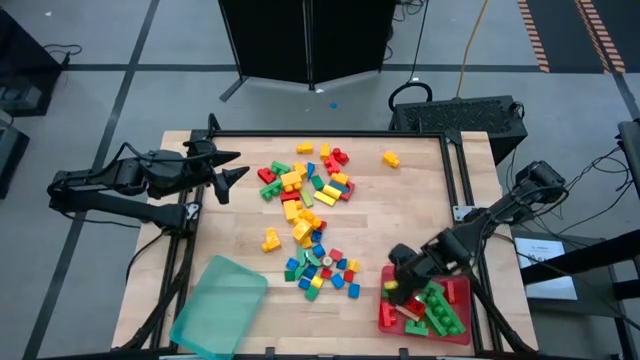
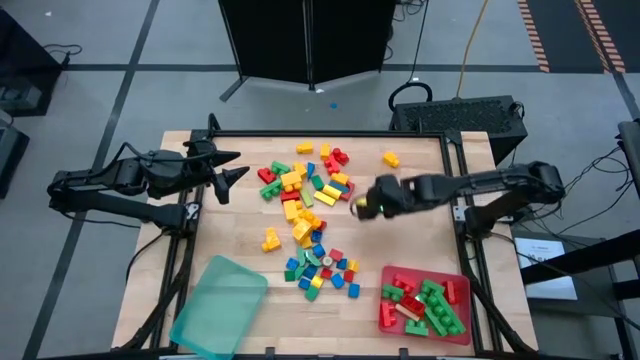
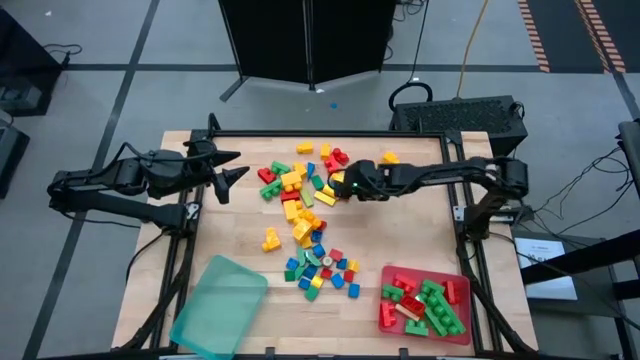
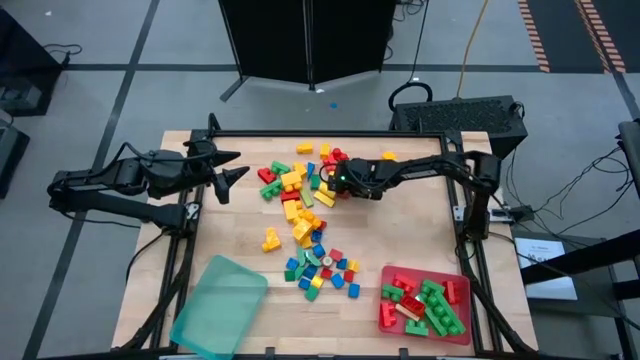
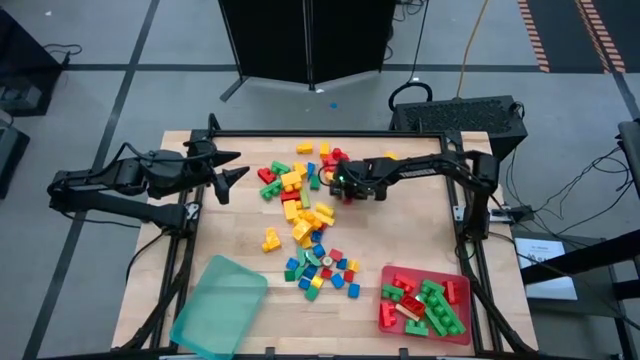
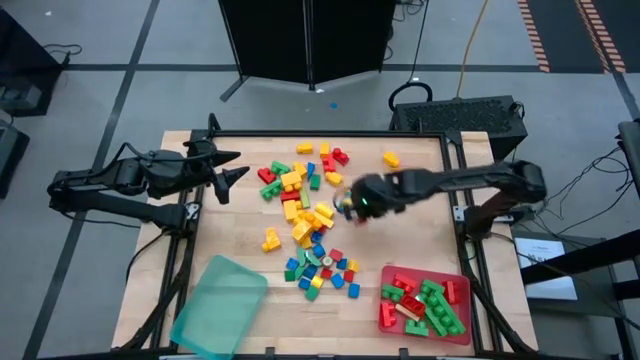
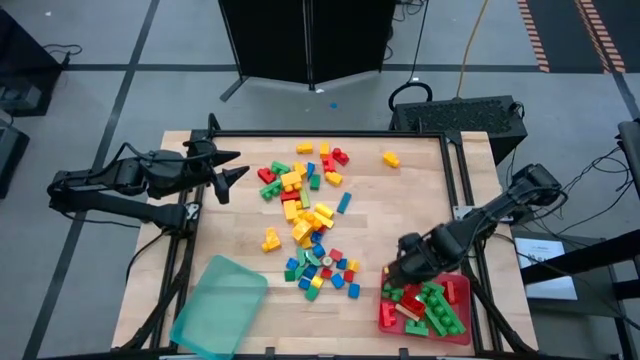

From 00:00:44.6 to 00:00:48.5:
Task: Sort blocks by size
Put the red arc block into the pink bin

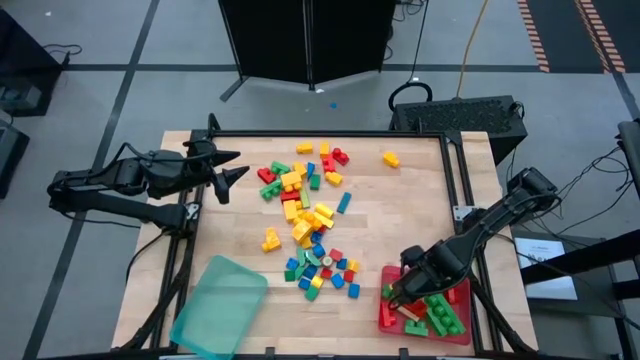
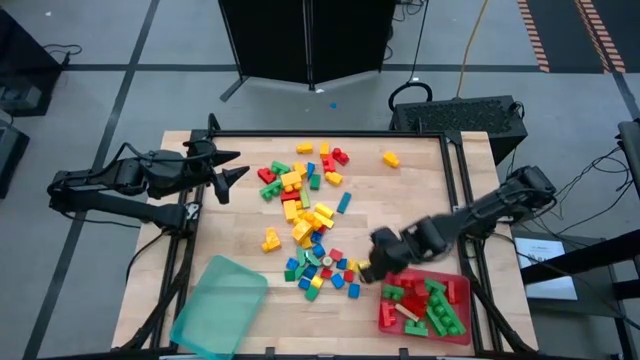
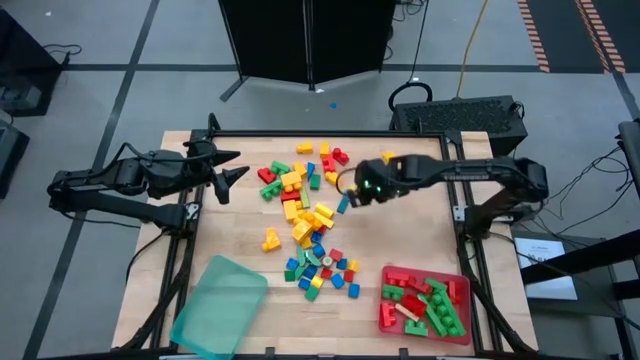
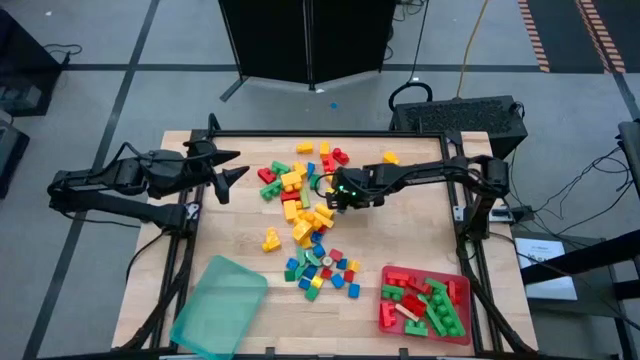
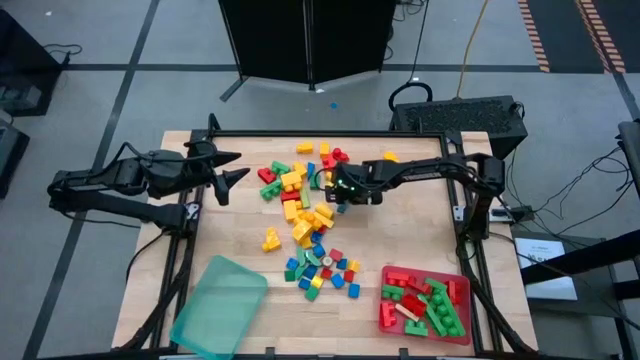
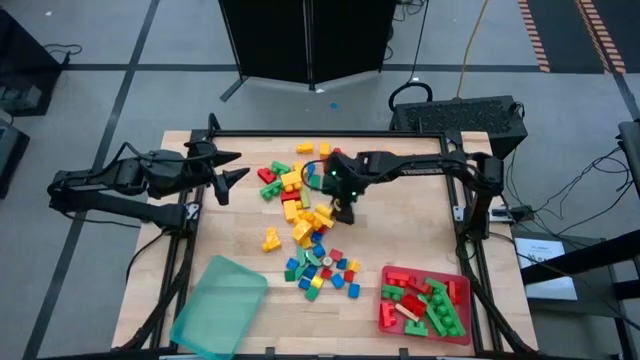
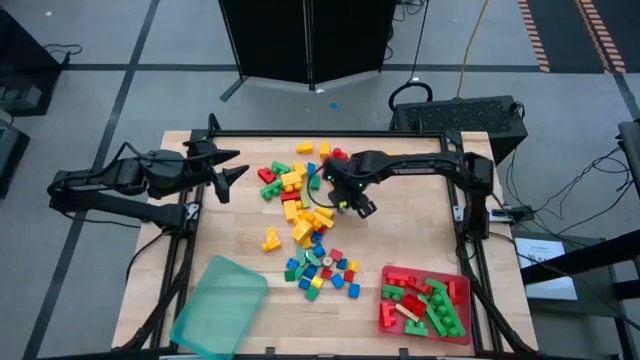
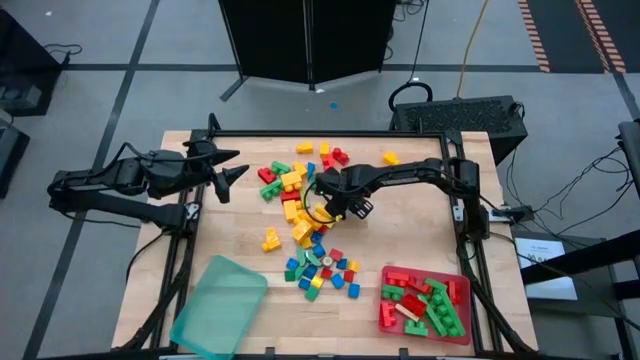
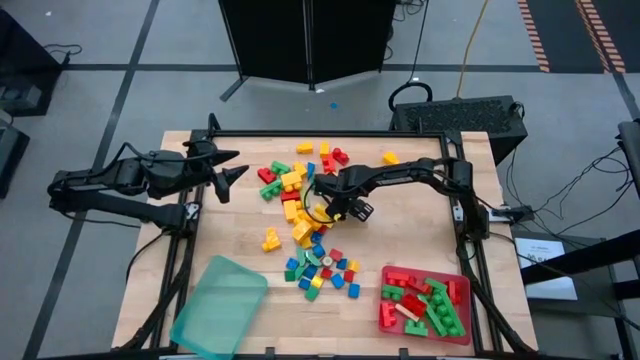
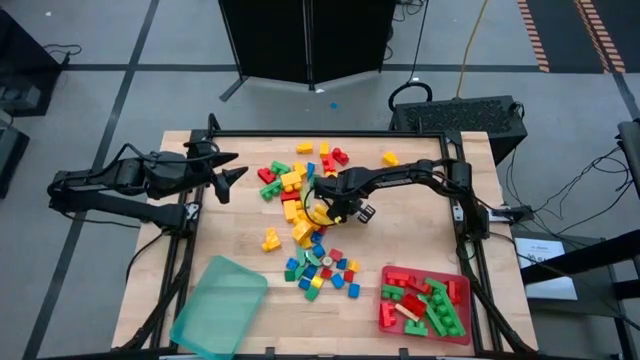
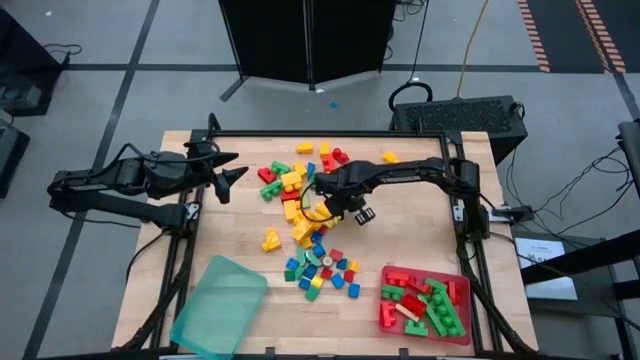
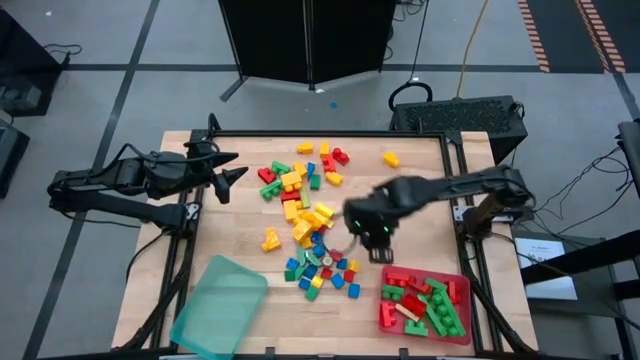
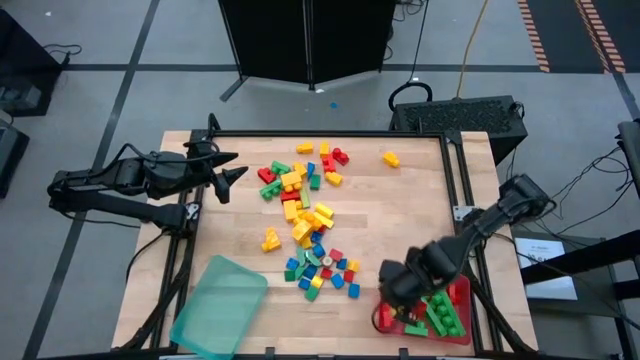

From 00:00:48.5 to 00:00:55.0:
Put the blue block into the pink bin

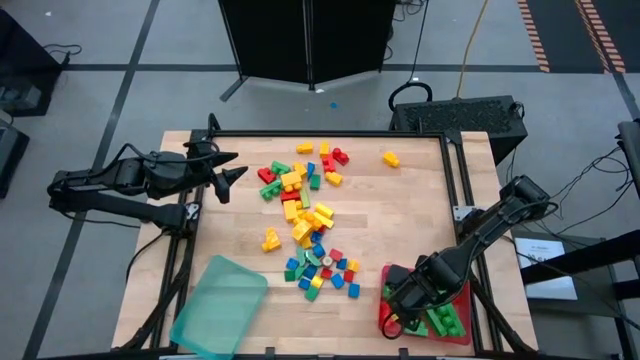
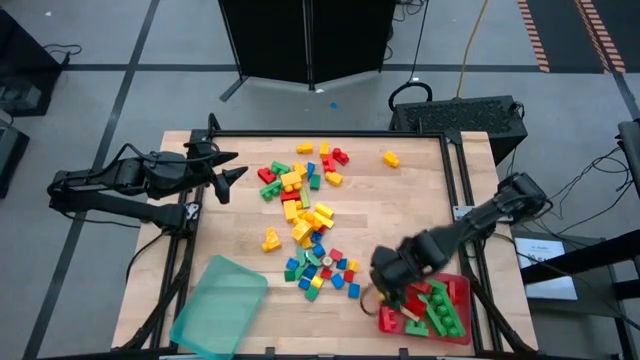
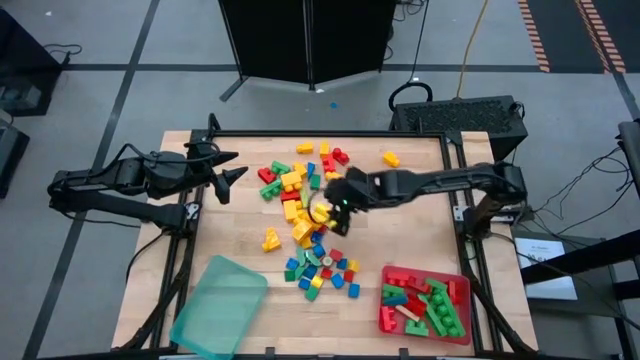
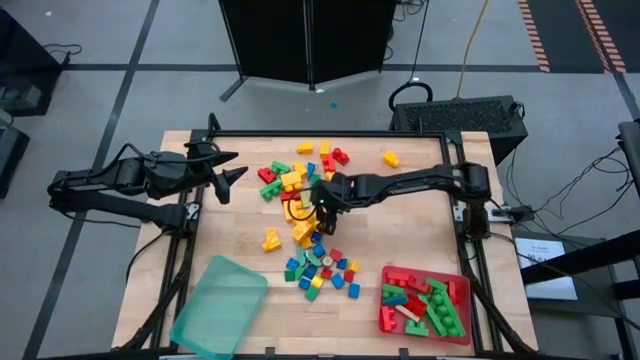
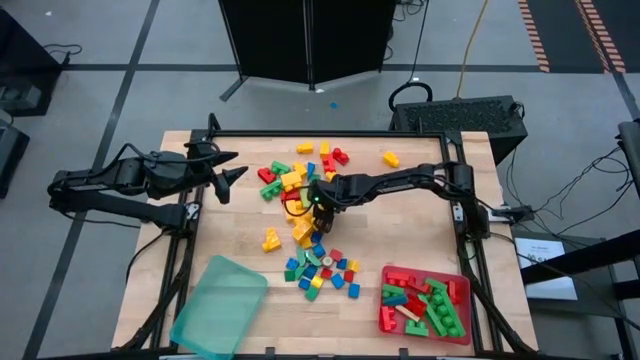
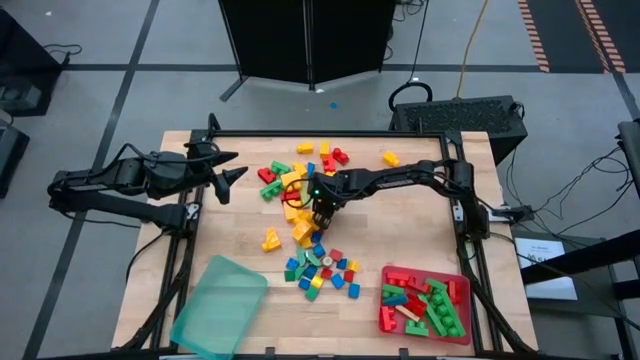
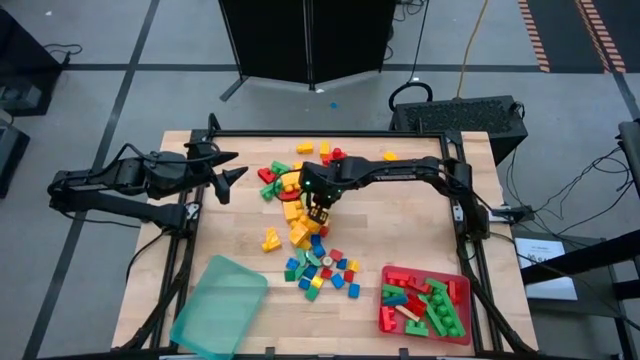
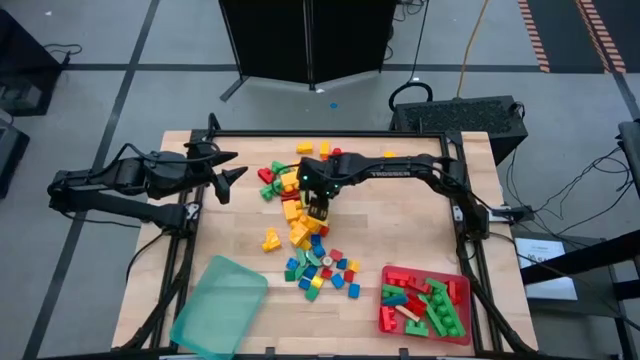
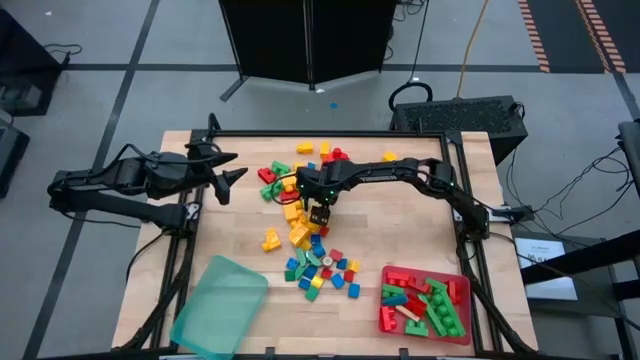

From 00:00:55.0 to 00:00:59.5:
Put the yellow block into the pink bin

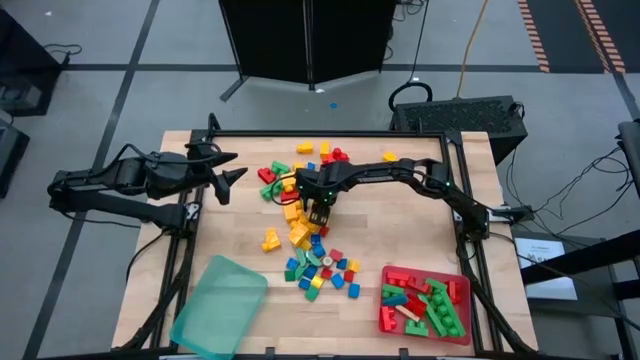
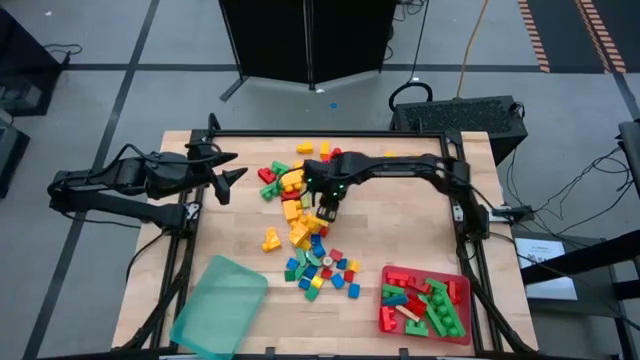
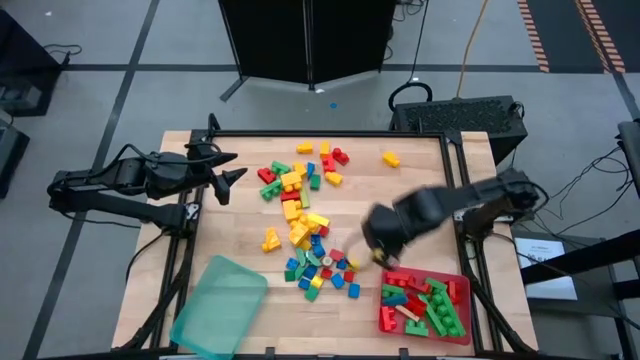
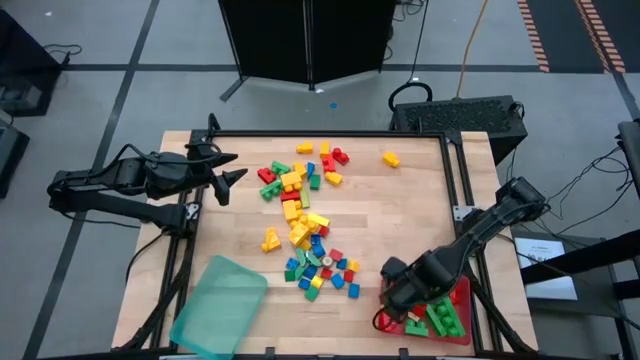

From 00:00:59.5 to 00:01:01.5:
Put the yellow block into the pink bin

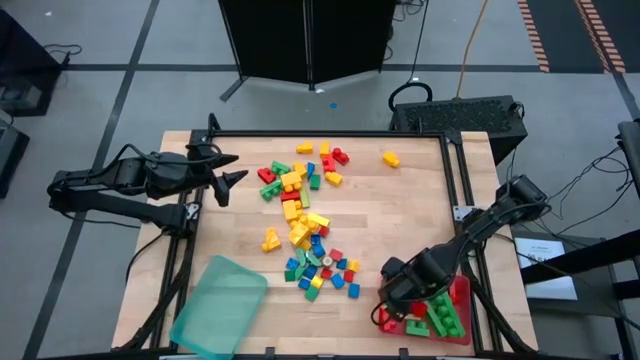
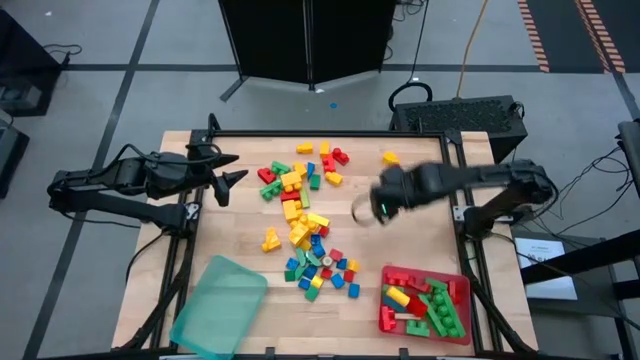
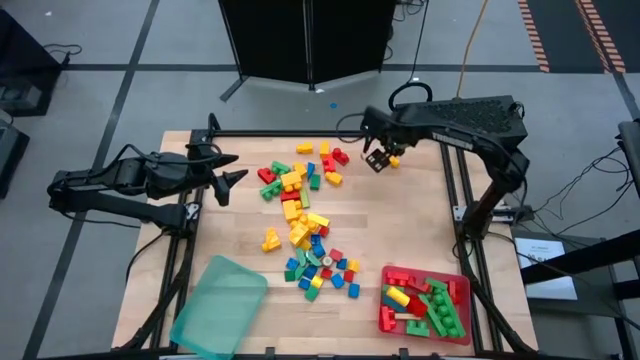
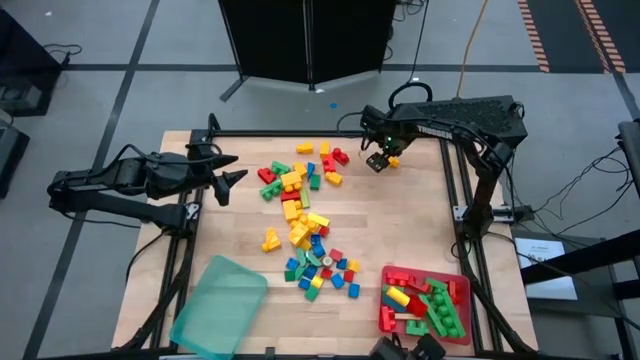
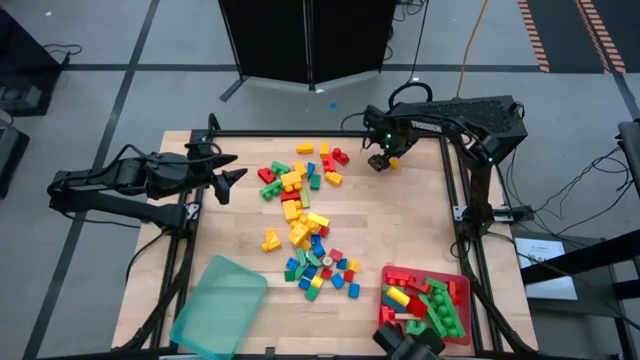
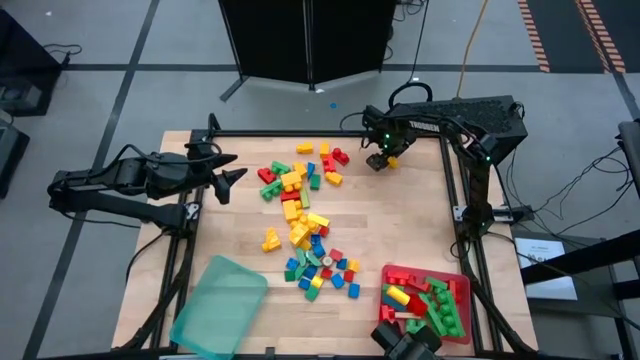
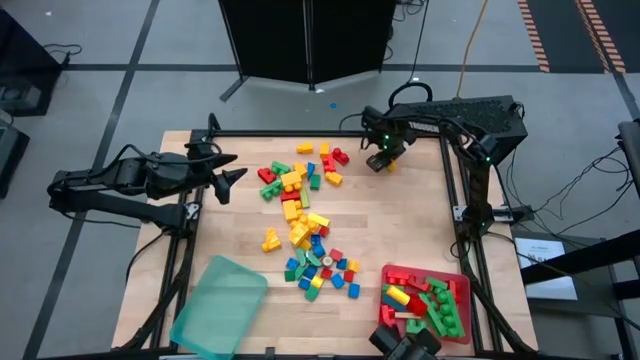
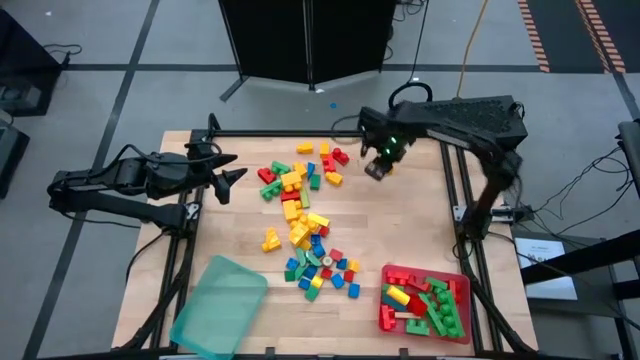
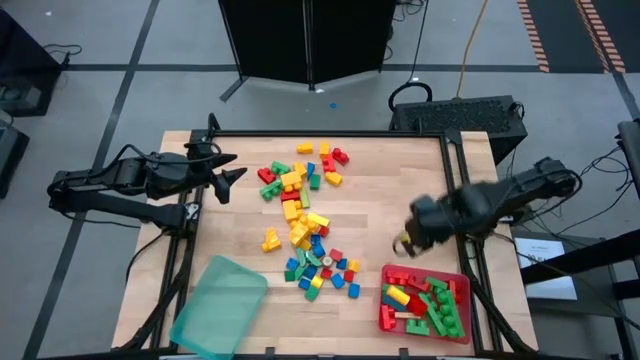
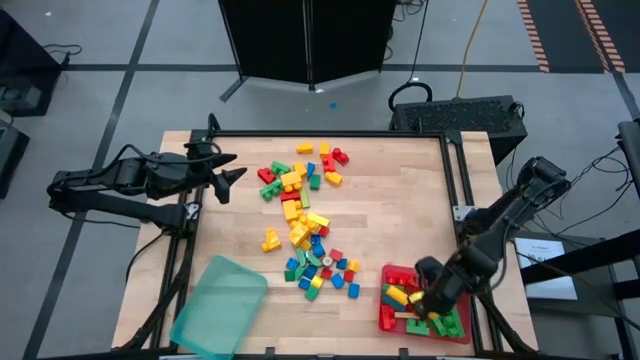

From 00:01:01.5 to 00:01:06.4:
Put the 1-stud yellow game piece into the pink bin
